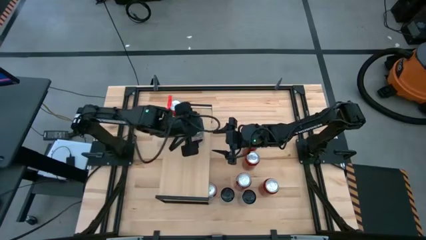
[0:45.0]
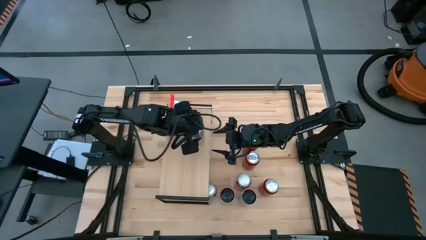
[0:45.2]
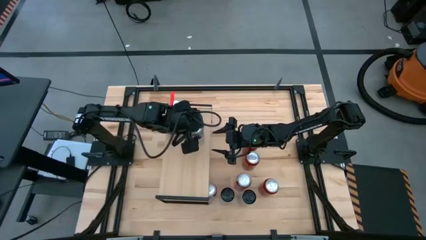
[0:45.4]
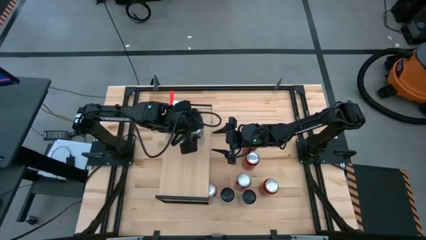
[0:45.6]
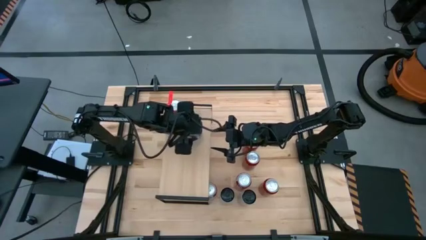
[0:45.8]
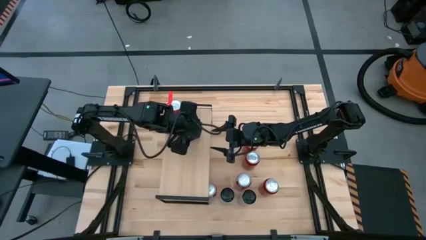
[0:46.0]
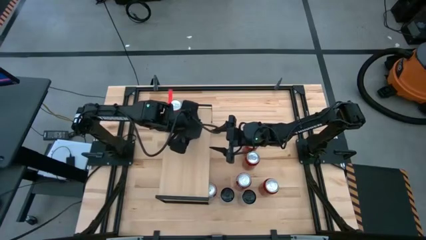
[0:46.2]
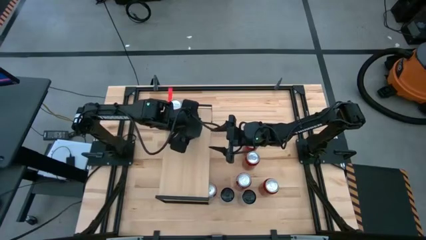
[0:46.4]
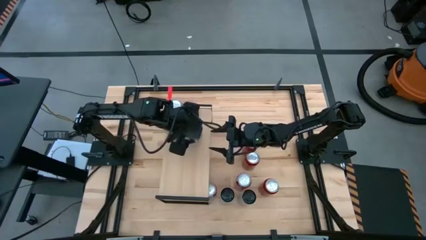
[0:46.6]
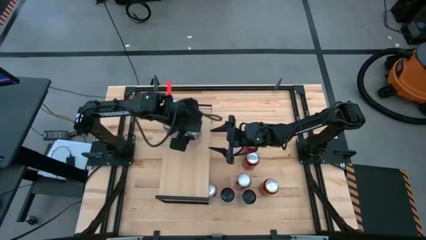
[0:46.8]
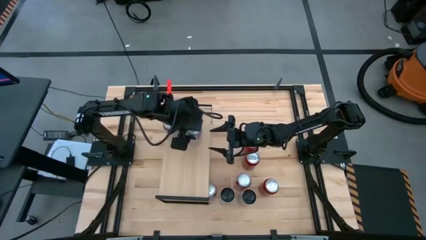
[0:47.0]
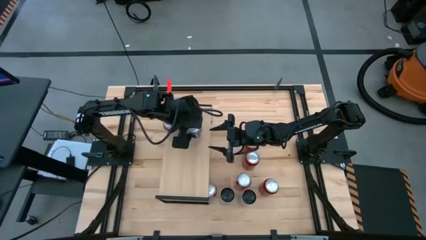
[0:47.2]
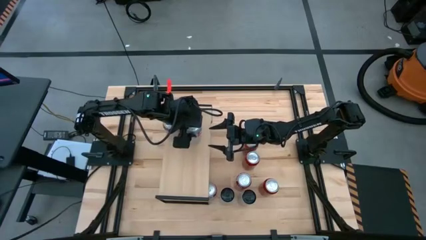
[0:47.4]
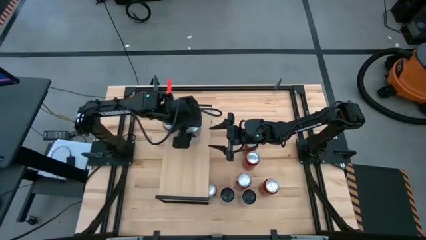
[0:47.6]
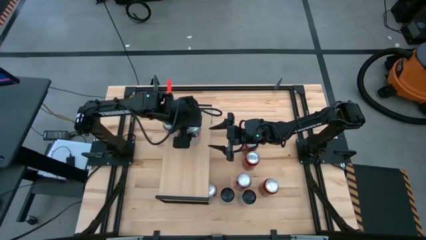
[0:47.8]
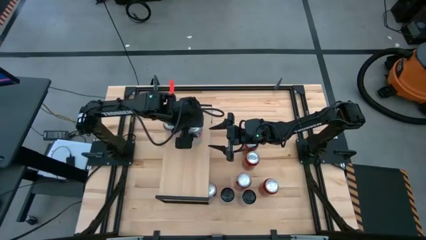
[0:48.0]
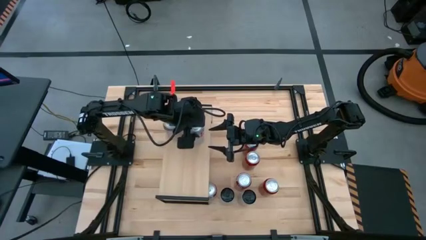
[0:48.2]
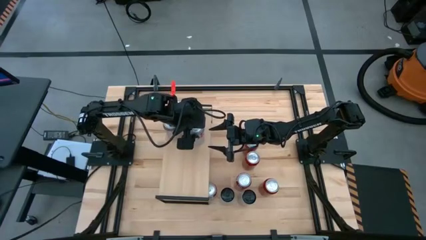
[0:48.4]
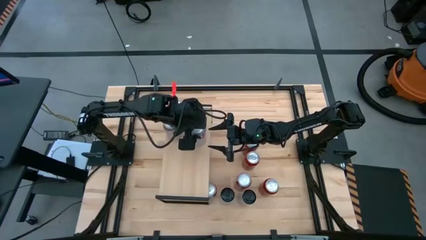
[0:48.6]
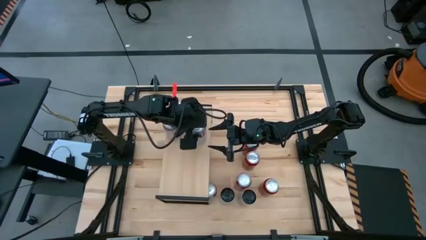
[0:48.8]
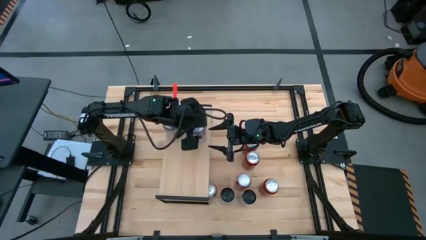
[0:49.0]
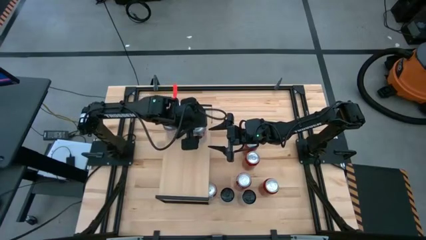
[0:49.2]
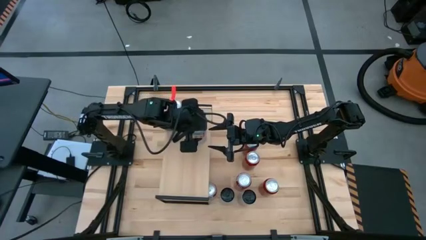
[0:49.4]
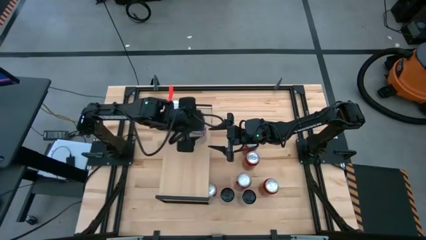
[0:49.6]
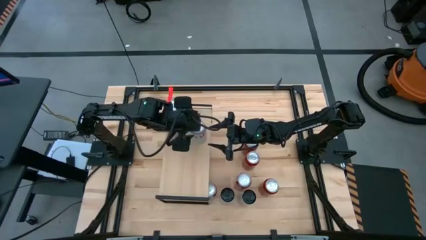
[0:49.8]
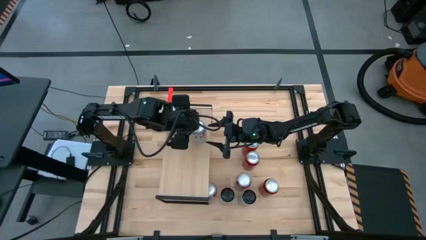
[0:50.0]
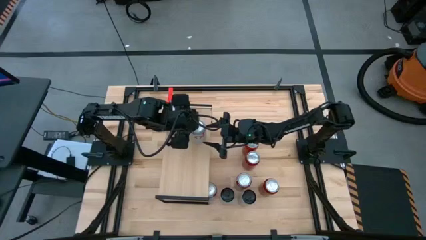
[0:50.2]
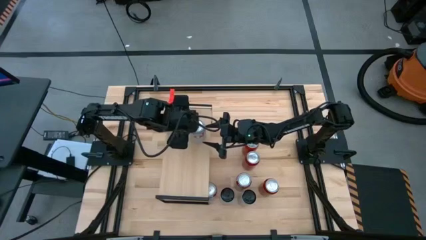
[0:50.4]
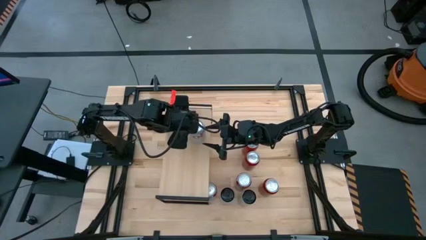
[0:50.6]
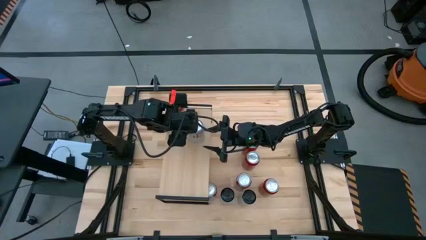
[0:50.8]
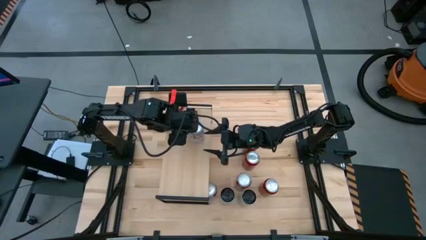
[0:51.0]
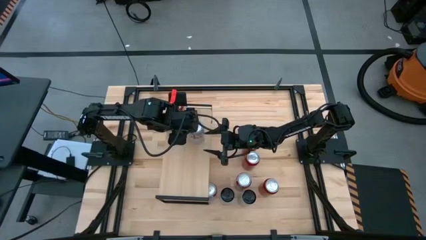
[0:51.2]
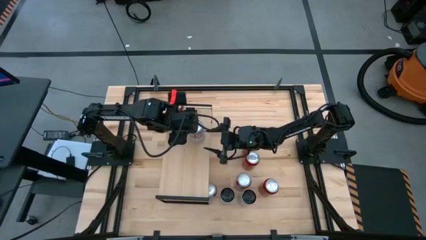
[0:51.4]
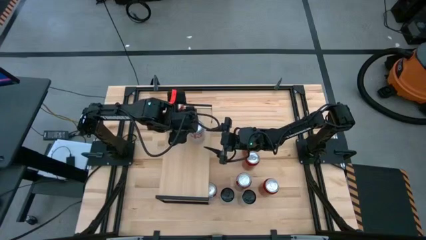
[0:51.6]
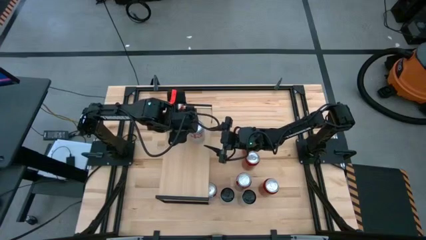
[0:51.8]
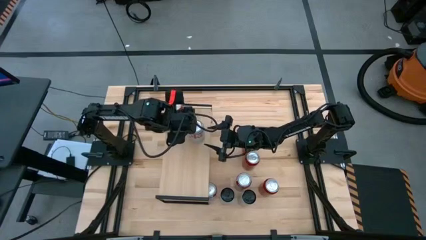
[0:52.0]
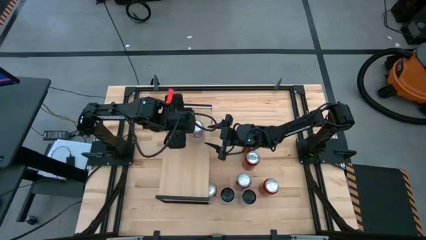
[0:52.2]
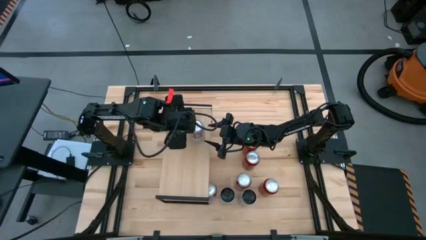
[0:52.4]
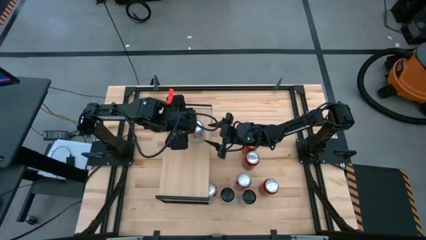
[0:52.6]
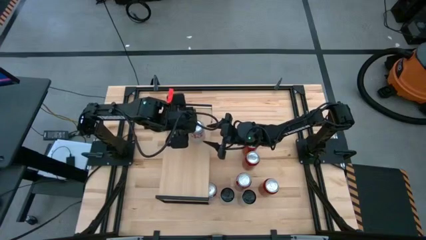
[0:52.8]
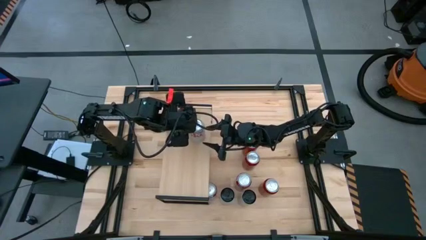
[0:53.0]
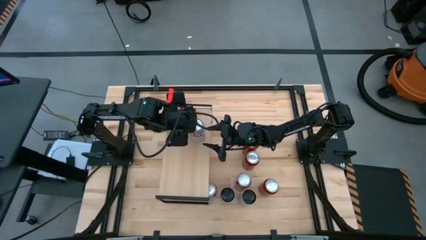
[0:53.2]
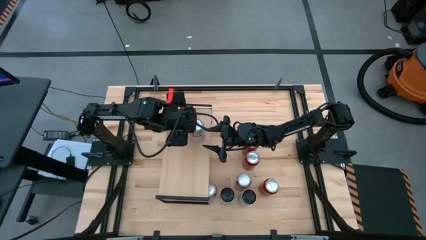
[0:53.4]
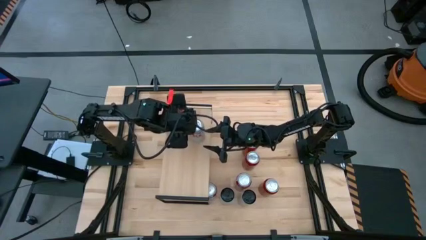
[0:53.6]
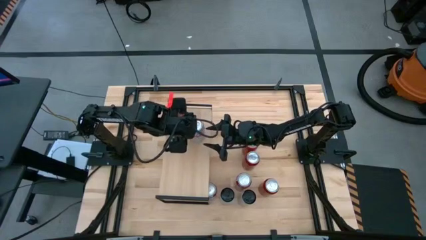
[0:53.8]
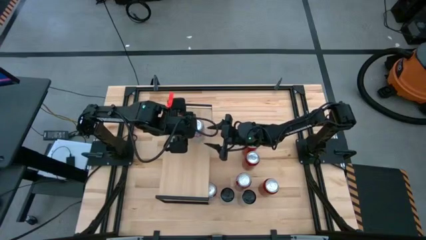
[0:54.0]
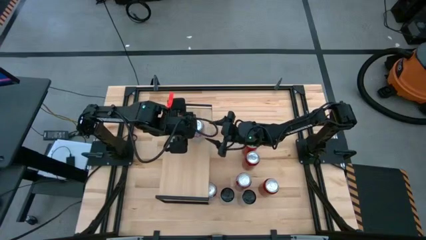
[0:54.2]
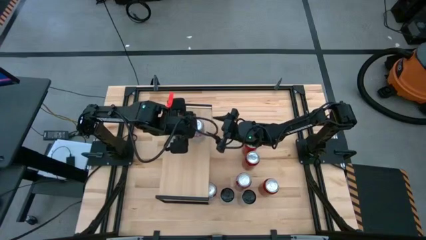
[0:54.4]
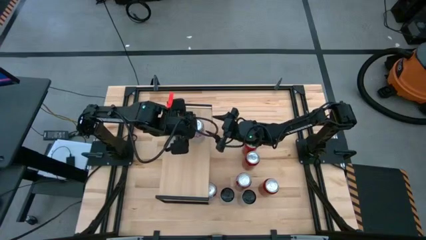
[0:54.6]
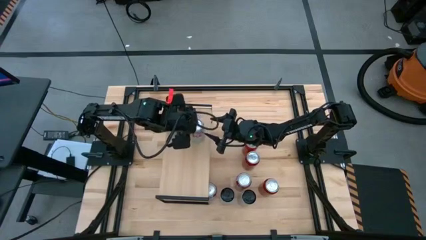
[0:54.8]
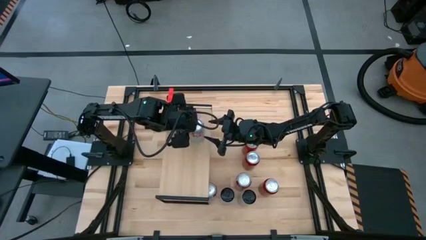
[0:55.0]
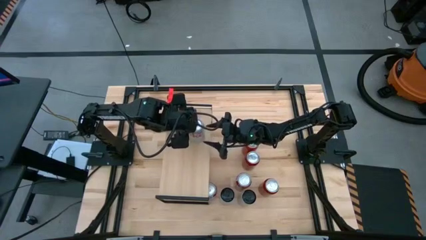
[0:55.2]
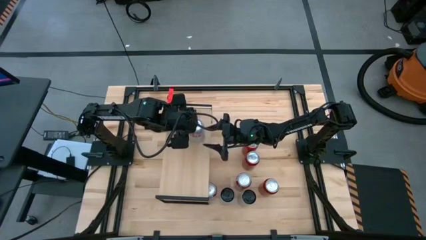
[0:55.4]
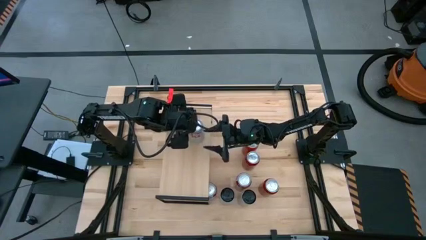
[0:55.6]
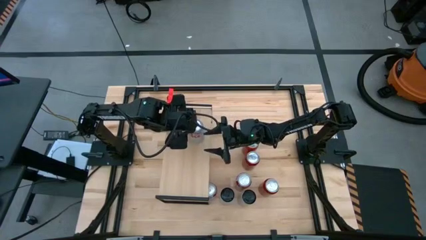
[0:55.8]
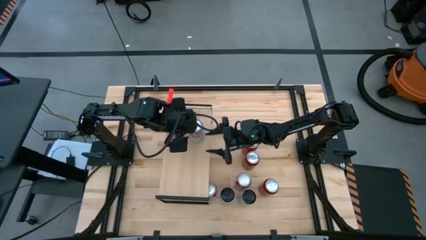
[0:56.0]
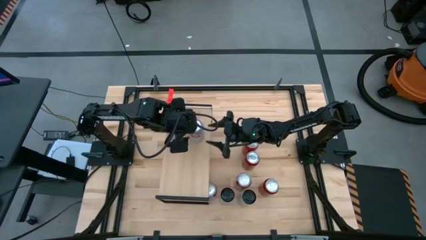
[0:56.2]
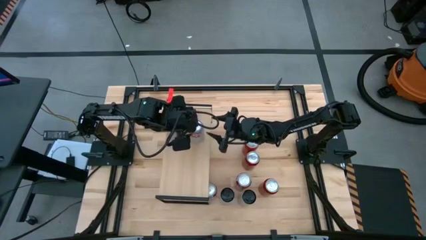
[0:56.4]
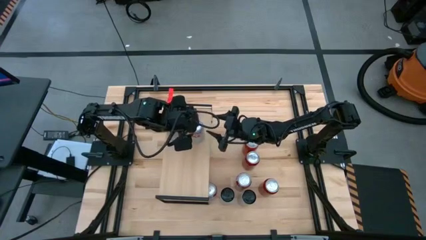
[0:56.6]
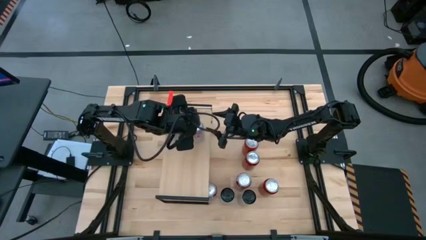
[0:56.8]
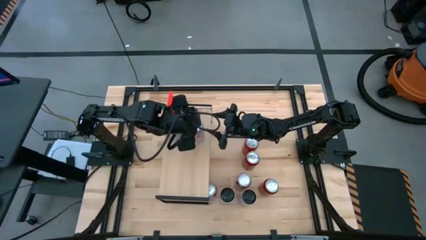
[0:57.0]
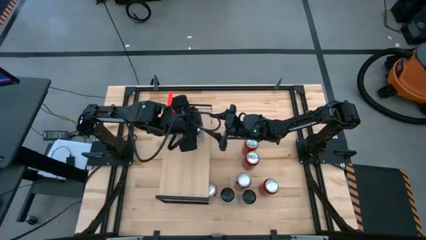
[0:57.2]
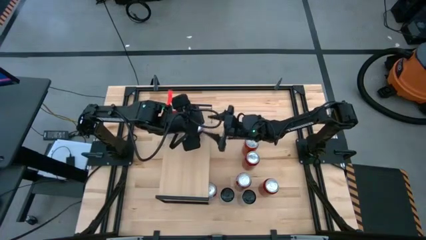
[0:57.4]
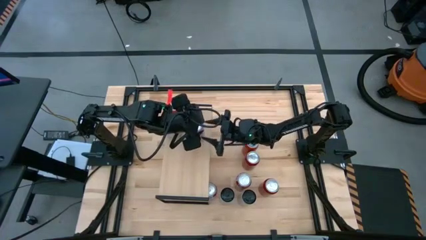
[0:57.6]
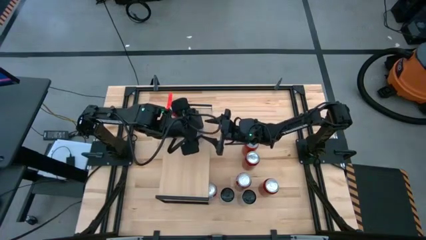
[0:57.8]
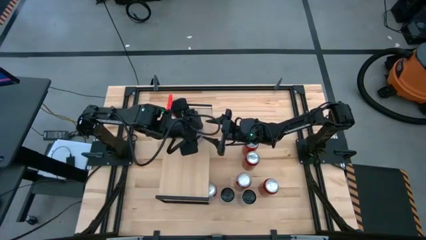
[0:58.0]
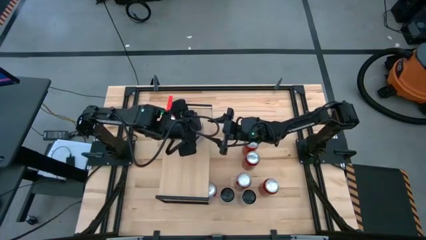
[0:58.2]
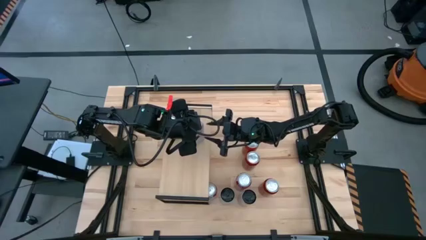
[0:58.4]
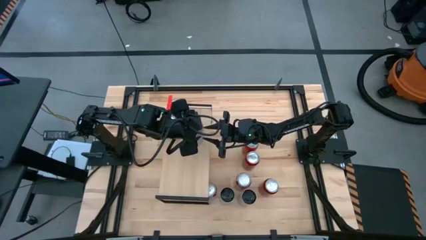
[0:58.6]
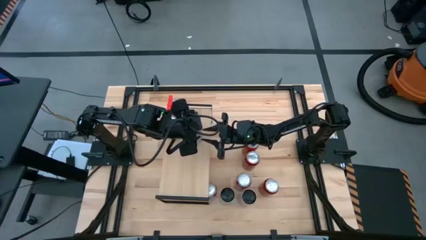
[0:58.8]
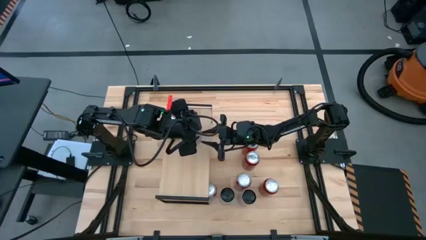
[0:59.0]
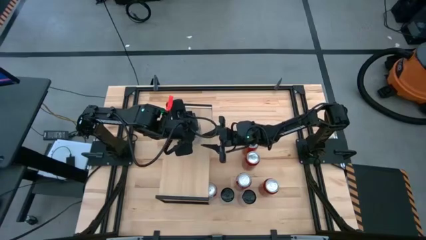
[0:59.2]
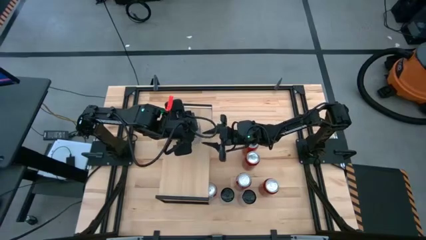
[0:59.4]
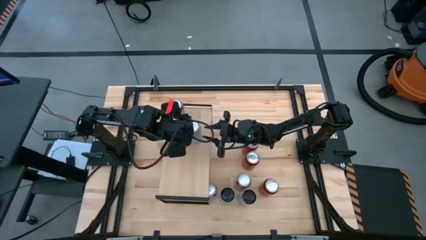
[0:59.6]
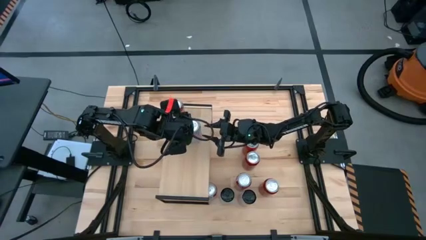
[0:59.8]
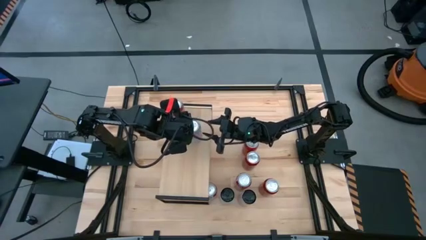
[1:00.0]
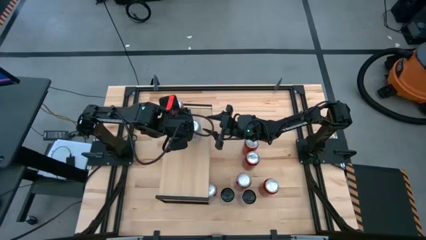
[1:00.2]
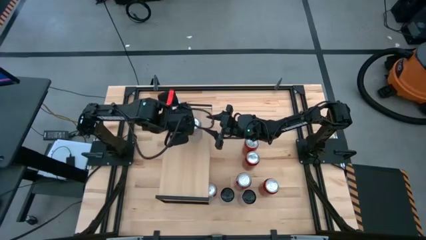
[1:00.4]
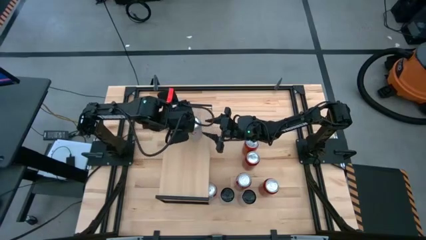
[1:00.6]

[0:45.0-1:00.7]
Task: Place canned beverage on shelf
Put the silver soda can on the shelf aligned with the other silver soda can
